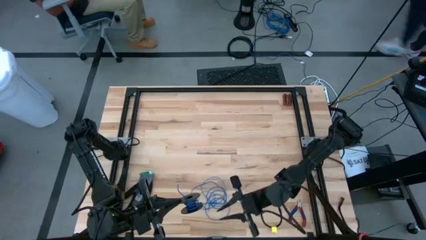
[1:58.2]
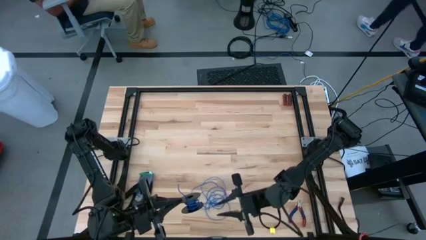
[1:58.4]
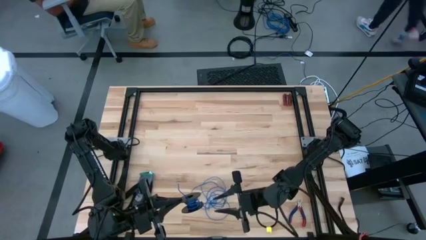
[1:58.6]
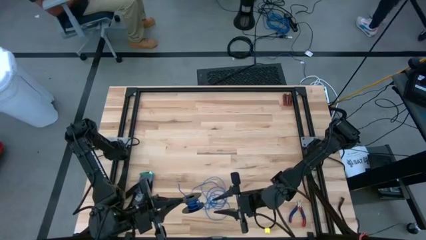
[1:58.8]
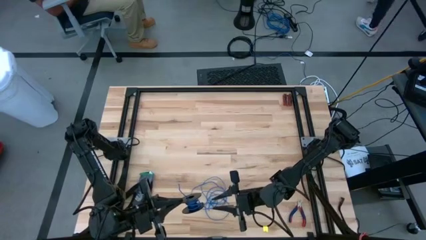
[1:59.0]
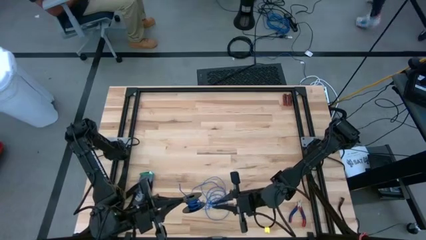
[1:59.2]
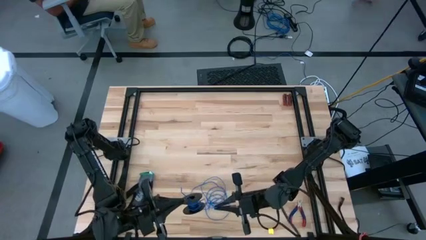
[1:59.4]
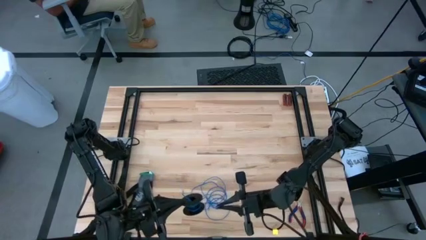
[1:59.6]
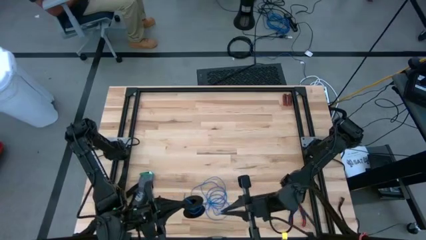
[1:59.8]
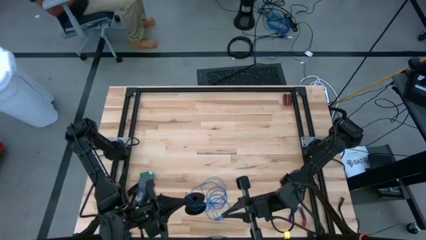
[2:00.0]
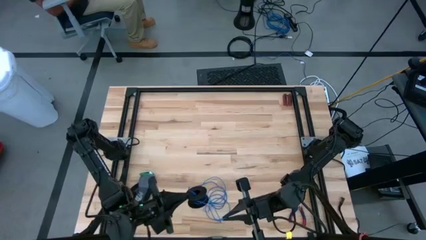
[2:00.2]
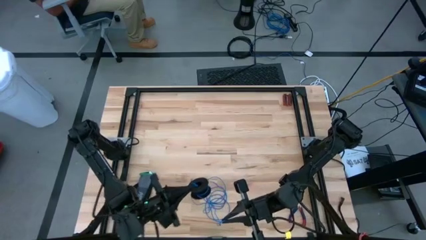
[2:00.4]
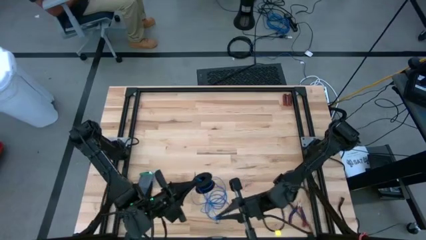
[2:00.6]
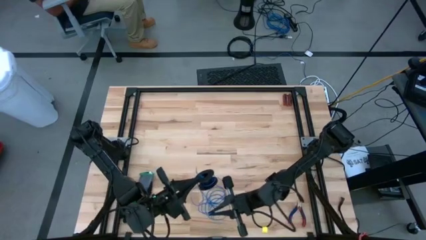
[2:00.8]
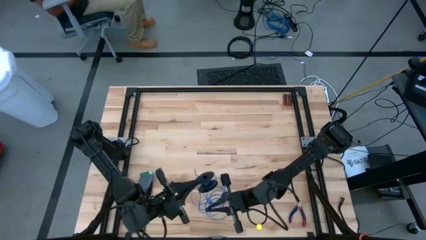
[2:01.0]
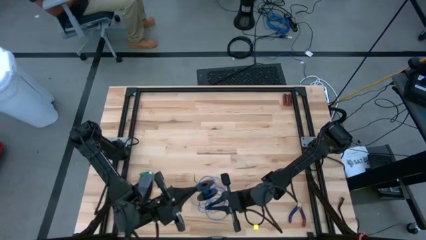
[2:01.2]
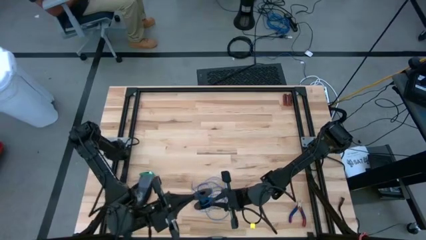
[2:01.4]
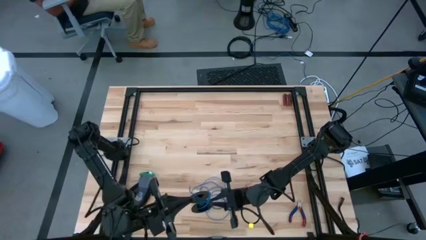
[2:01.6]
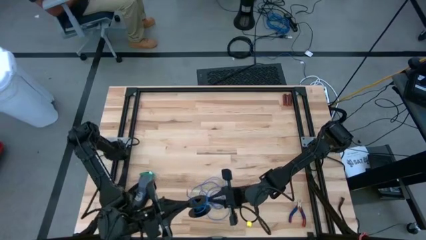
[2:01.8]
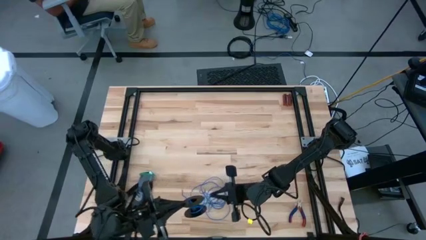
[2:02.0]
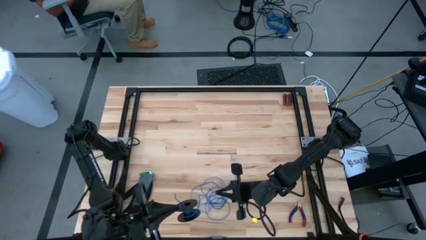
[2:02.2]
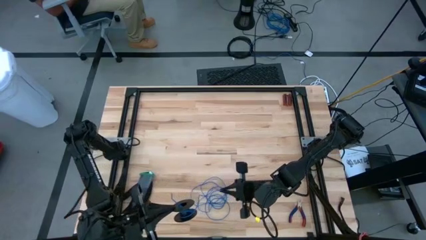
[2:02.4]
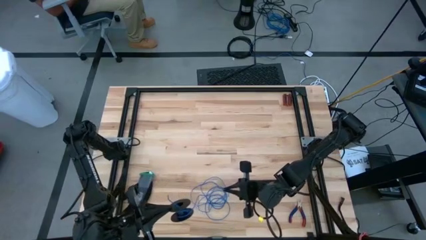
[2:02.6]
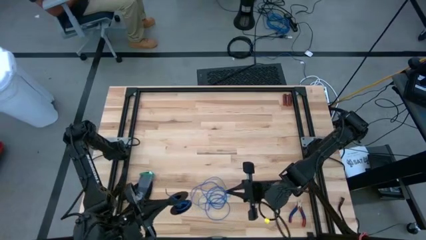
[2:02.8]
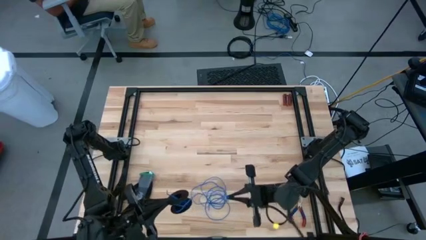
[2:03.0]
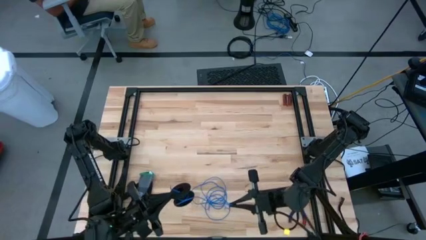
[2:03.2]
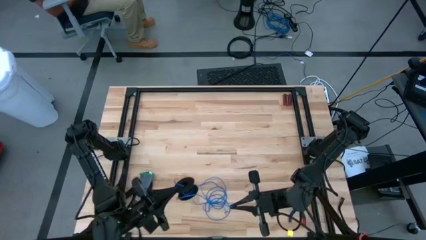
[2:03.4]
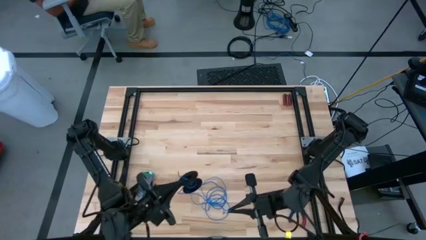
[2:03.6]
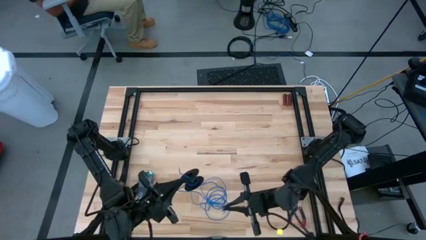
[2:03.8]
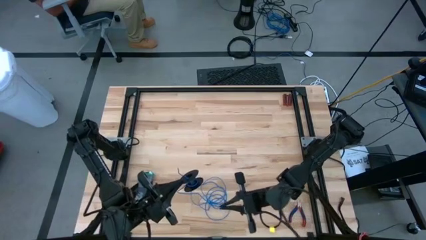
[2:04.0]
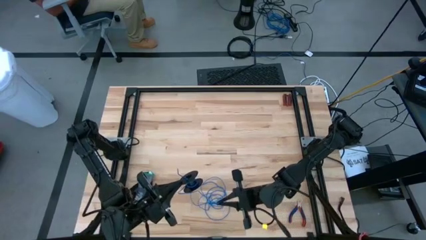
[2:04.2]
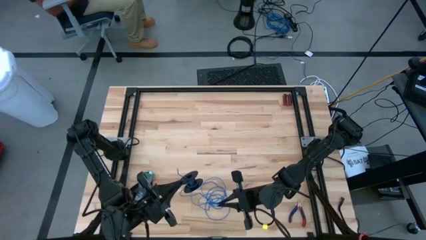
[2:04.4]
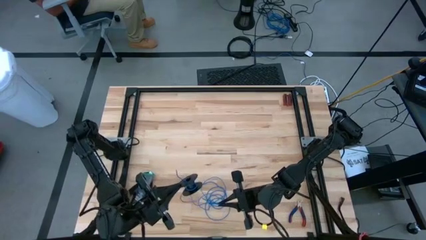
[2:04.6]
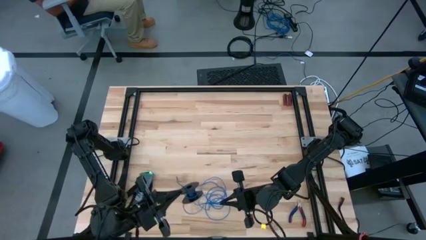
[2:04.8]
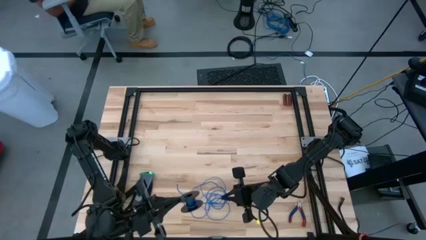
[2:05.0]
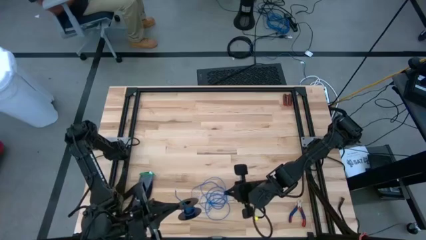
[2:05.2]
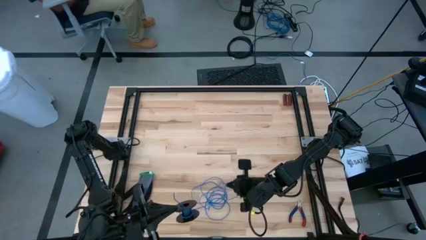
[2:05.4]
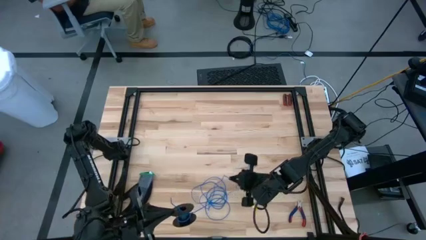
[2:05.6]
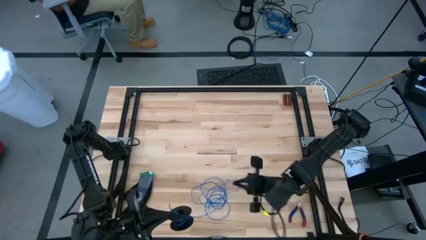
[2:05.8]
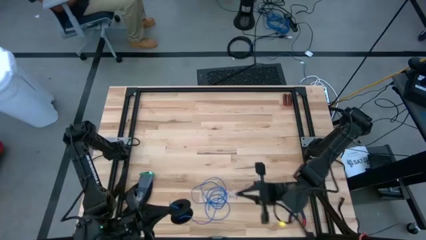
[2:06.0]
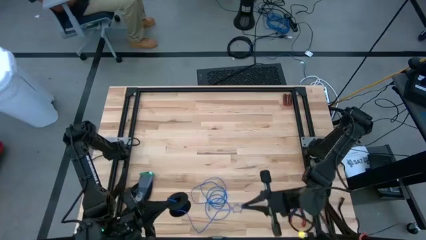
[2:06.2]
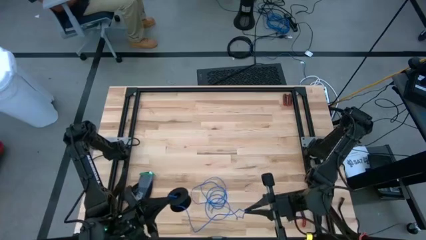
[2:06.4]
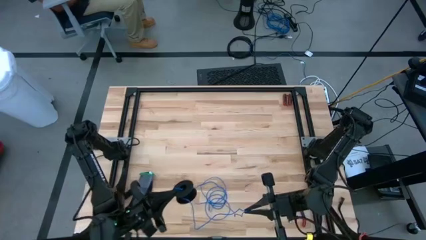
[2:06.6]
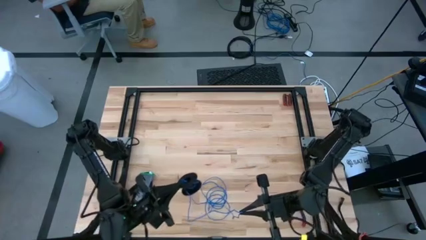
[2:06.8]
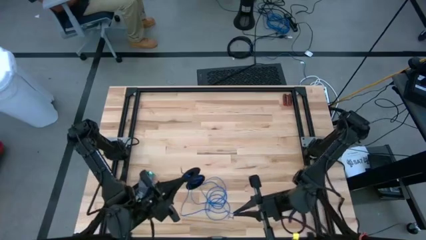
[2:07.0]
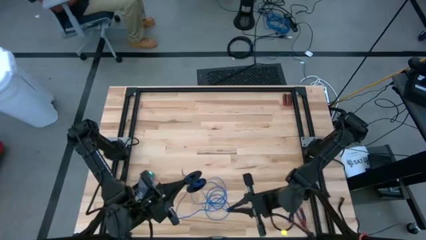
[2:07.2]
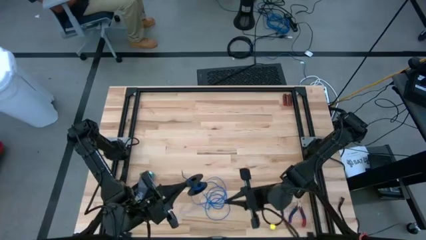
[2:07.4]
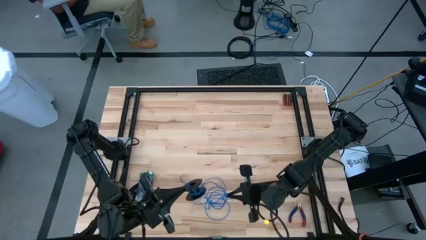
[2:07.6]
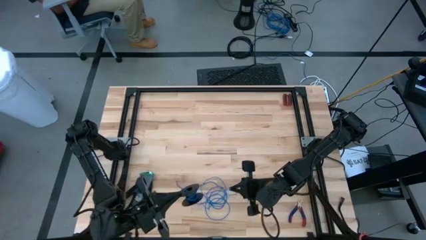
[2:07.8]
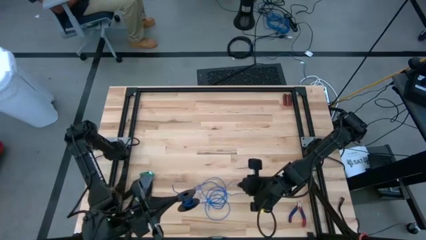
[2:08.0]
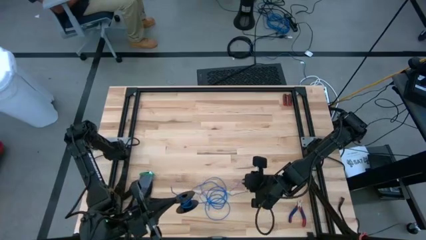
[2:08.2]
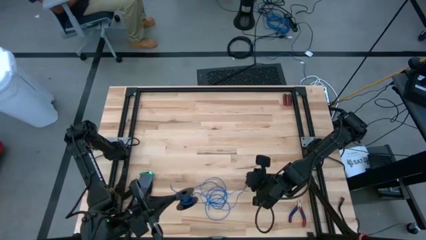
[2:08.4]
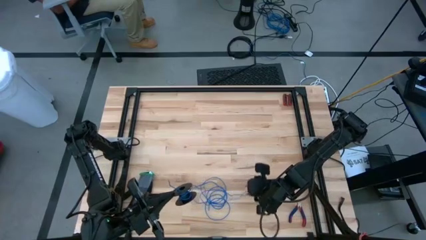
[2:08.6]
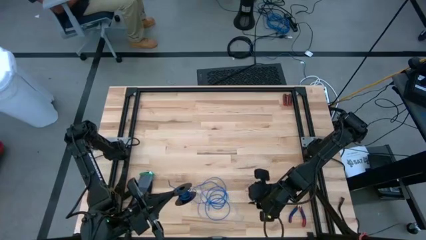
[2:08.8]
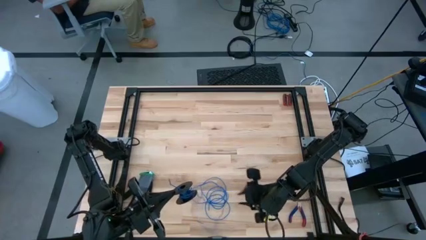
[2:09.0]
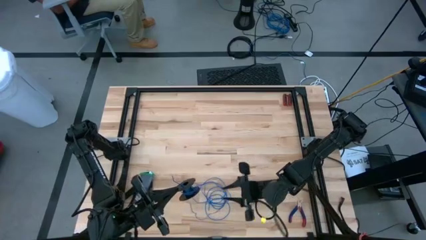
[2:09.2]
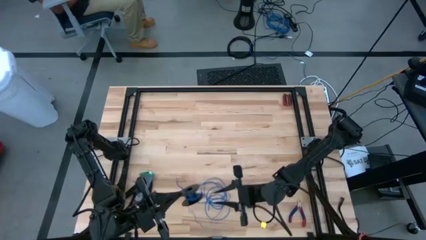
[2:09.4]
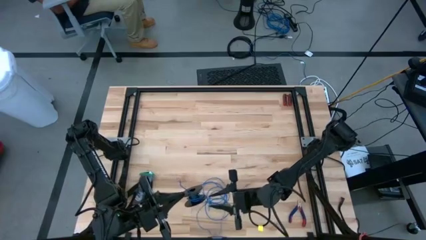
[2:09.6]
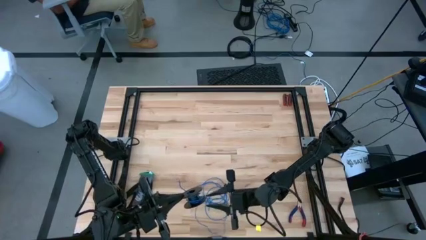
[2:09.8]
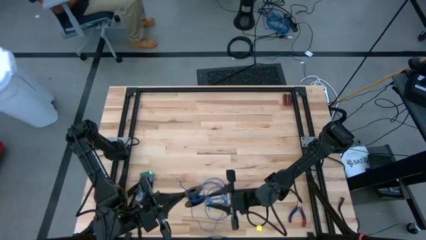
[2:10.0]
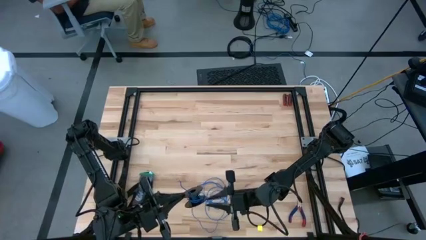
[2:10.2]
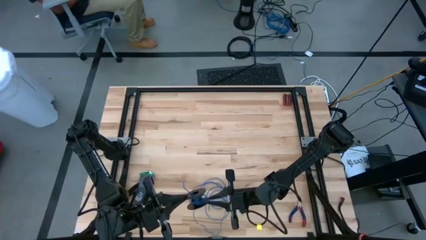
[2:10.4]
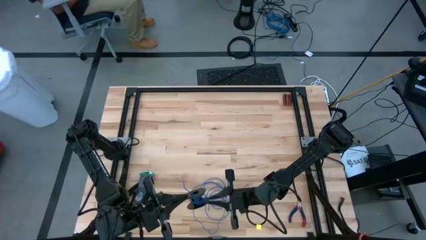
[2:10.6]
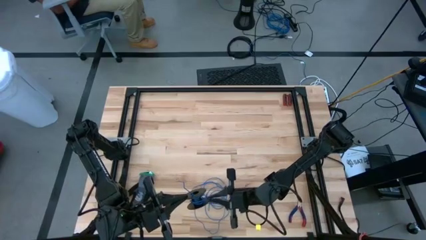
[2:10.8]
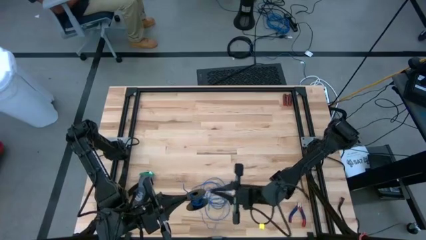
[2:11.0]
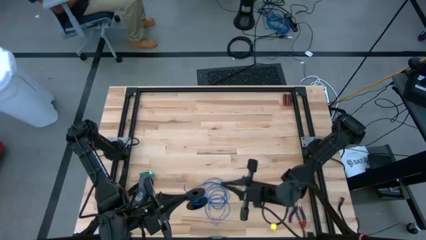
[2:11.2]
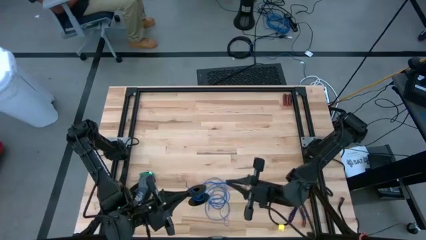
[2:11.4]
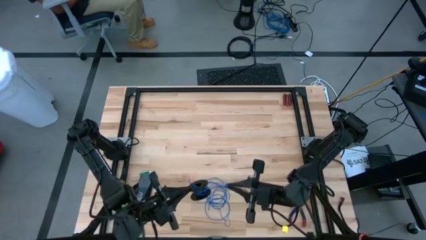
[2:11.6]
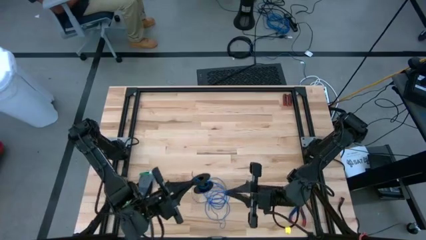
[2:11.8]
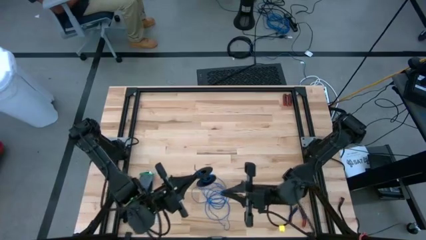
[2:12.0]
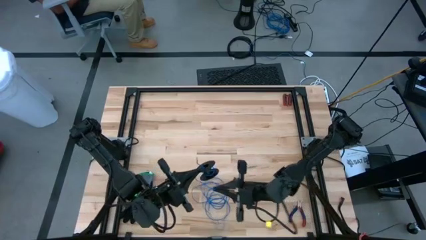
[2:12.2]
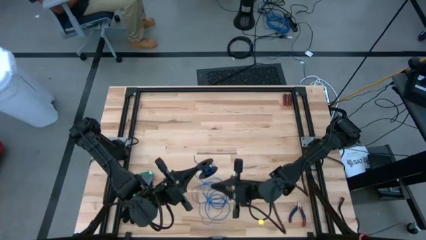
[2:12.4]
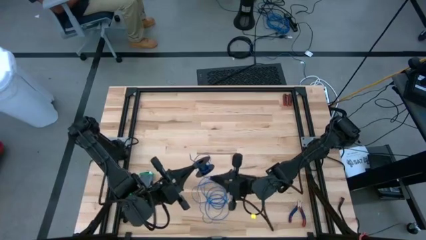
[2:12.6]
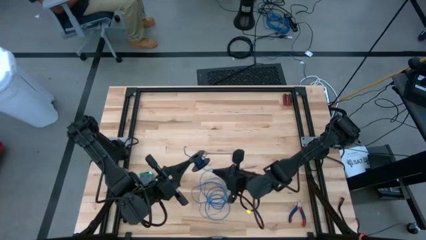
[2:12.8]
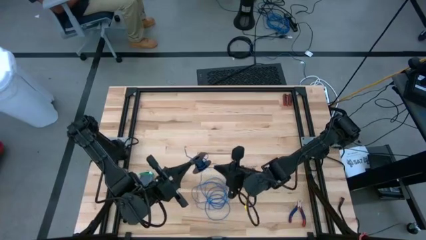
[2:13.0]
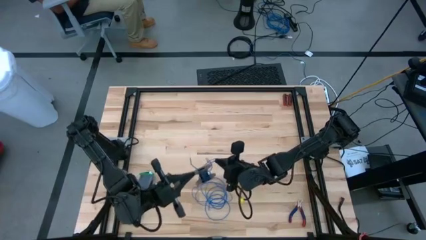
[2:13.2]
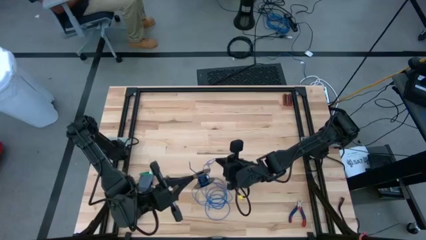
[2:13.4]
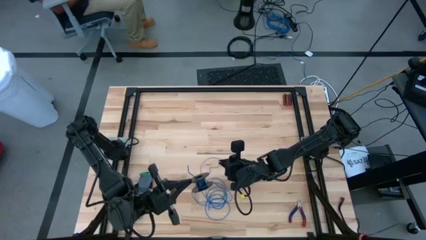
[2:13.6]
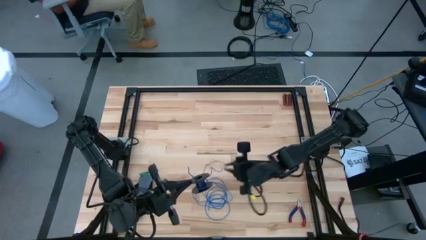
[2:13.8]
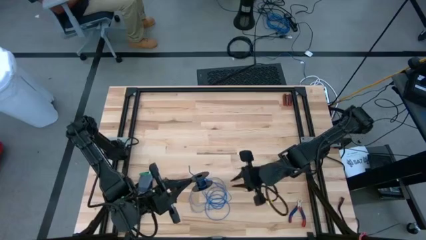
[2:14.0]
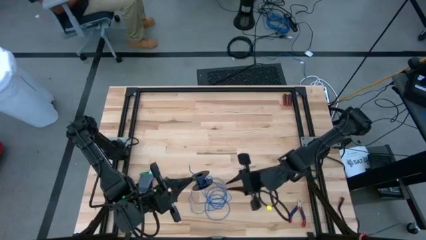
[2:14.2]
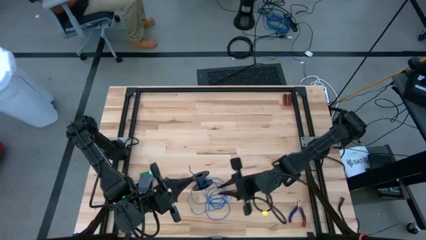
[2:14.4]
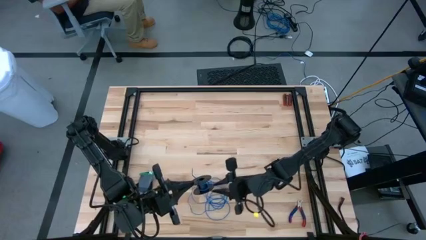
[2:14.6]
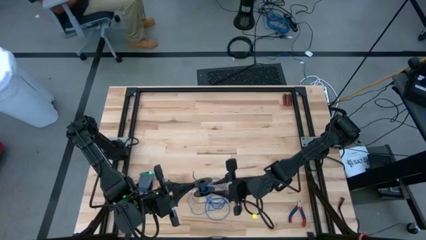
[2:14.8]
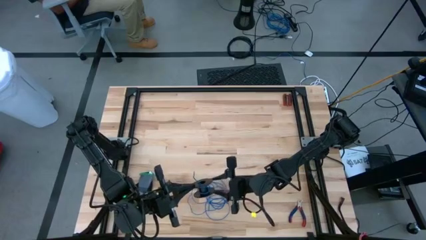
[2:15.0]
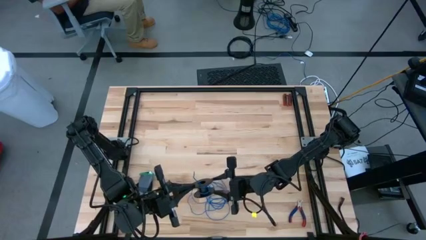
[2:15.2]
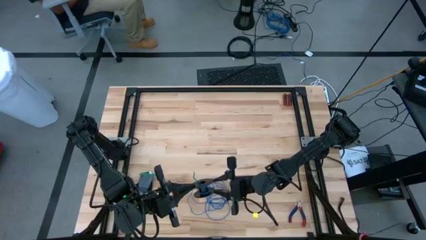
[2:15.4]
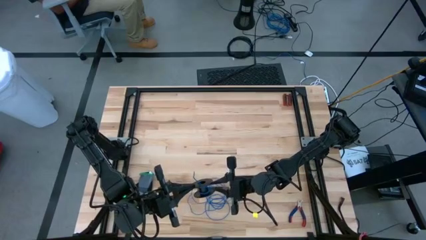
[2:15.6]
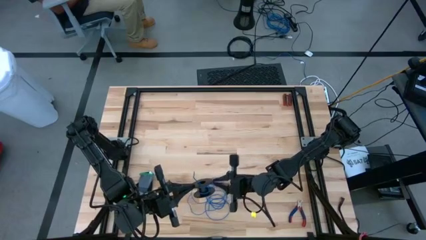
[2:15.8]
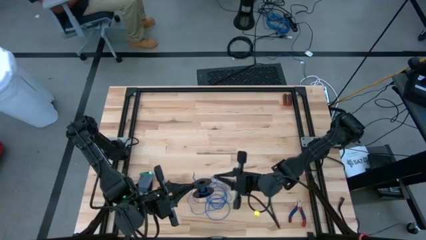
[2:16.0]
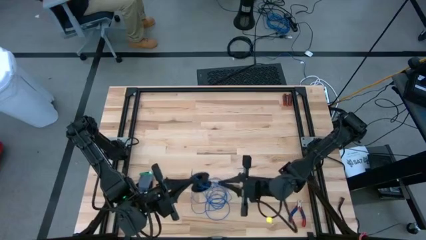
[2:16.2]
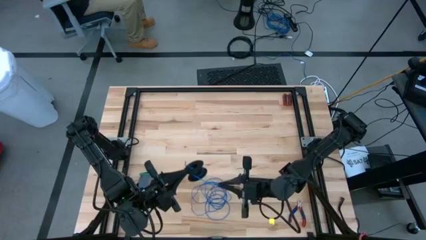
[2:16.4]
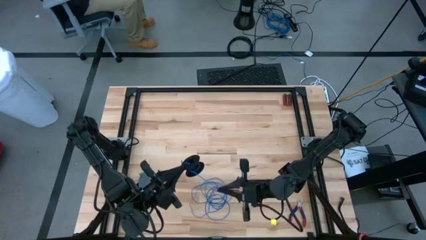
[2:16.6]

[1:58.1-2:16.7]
Task: Coil cords
Uncoil the blue wire from the spool
